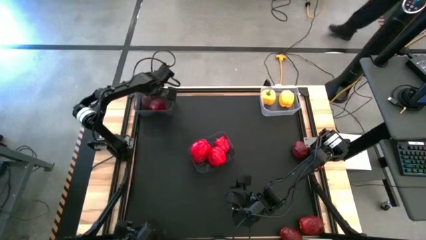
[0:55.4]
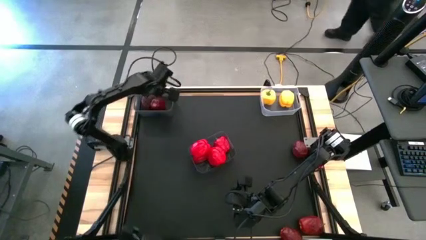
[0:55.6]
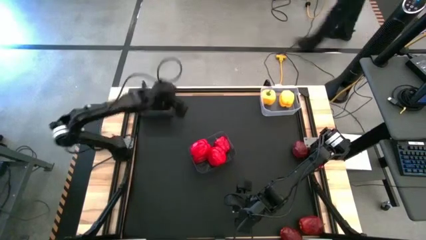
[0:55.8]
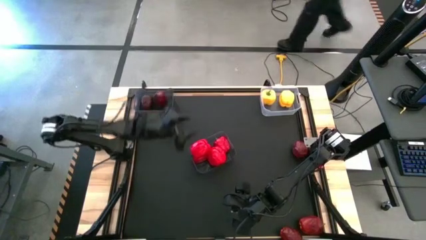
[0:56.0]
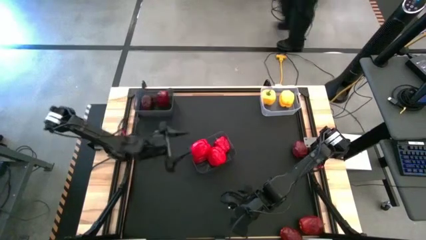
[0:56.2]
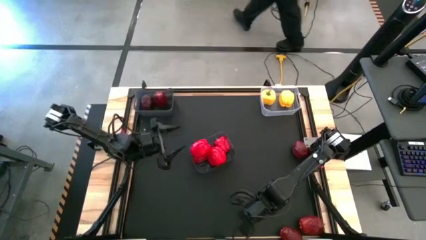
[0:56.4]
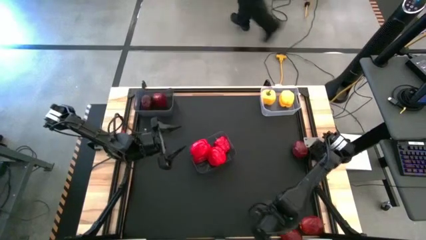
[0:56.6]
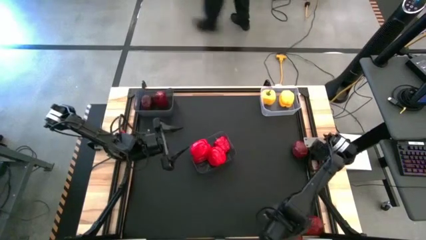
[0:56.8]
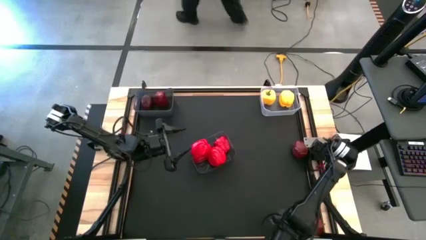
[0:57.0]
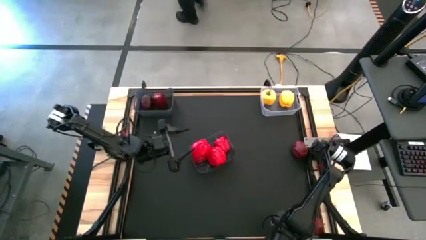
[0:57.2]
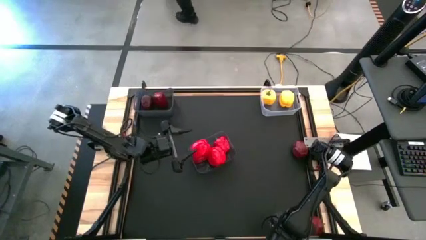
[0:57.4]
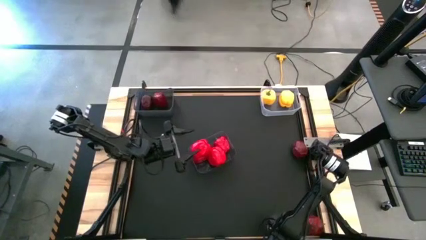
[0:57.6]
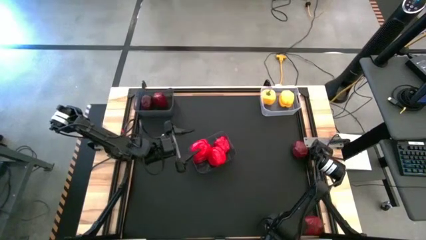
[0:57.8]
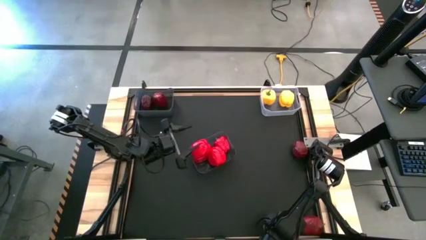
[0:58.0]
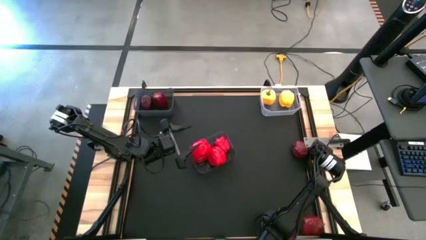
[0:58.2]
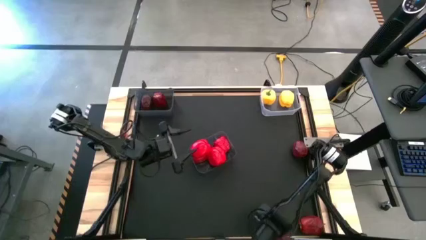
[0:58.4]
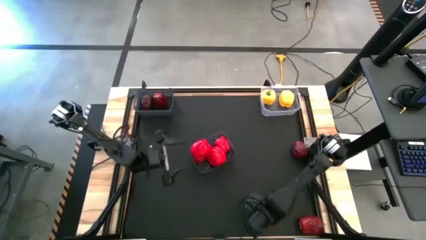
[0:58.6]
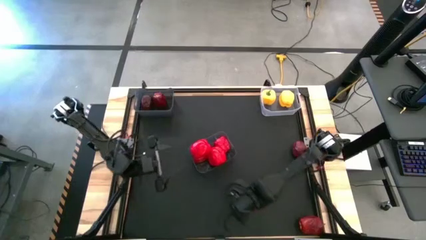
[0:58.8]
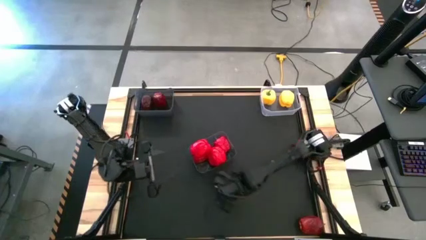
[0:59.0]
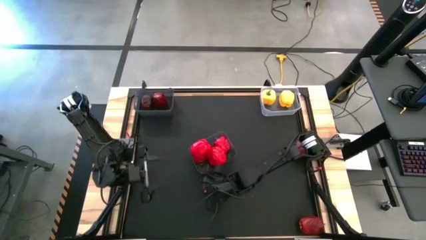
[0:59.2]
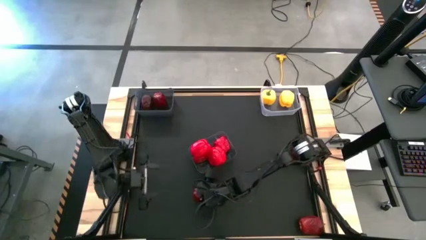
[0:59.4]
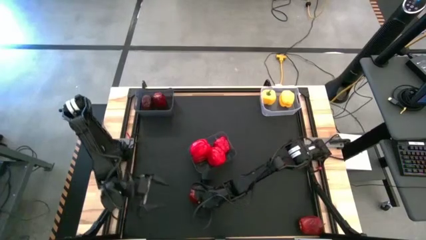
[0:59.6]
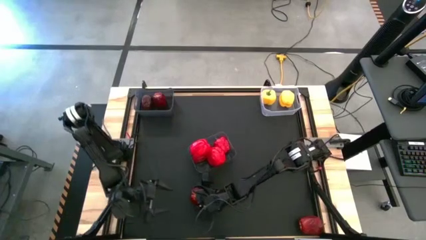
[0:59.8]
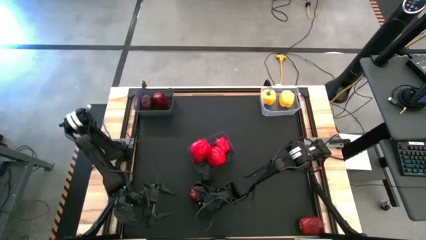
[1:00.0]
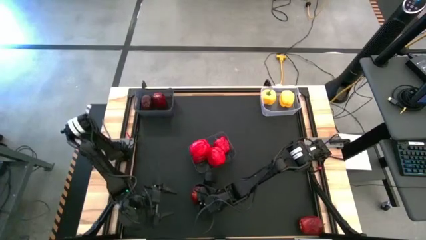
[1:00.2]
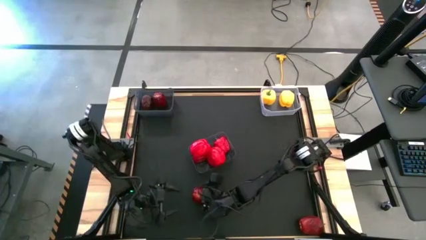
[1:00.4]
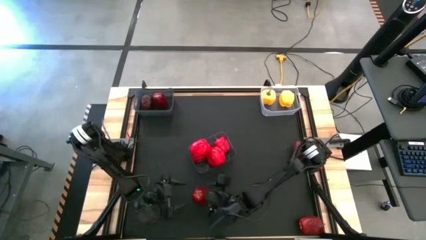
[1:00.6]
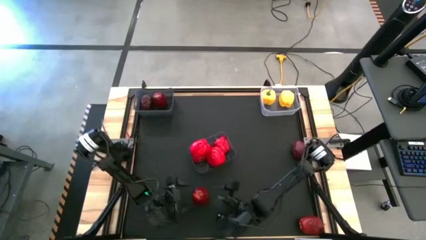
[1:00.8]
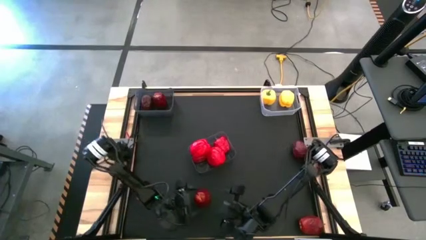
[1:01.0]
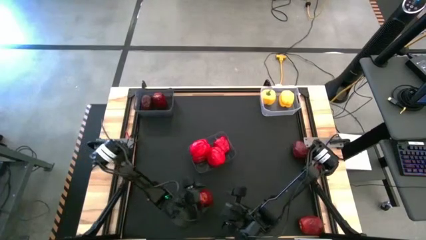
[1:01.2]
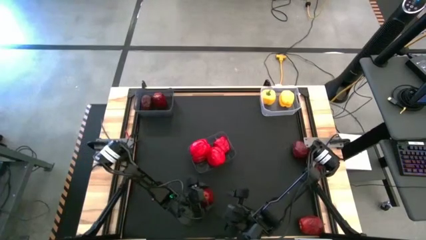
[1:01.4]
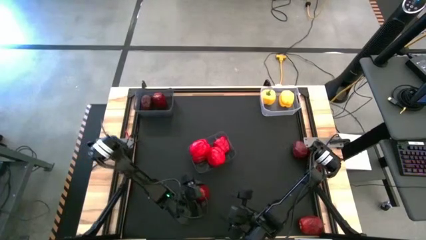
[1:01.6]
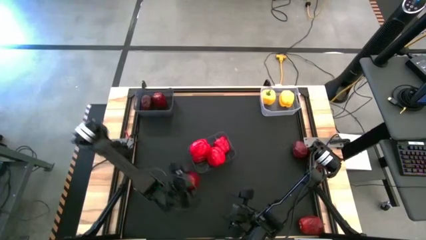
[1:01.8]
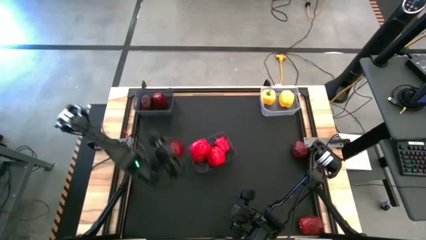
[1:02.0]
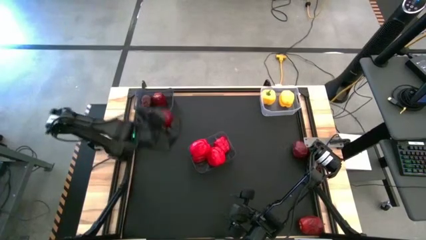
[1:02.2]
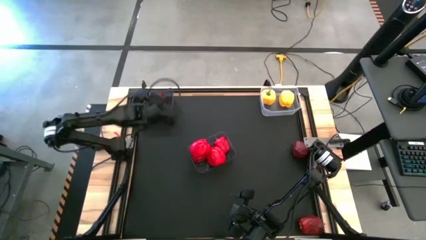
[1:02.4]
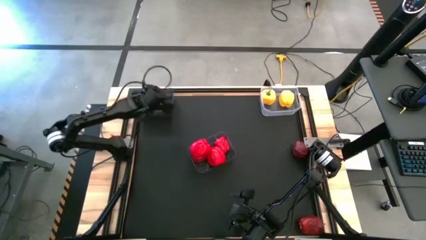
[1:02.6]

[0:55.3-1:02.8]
Task: Sort produce into baskets
Put the red apple into the top black bin

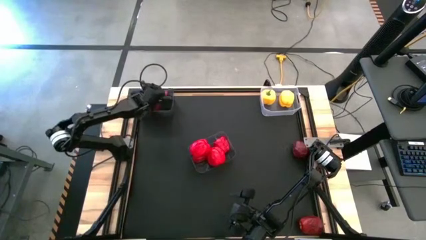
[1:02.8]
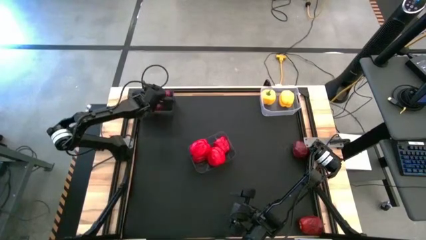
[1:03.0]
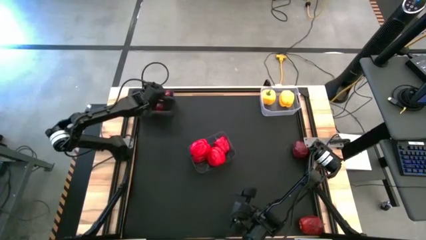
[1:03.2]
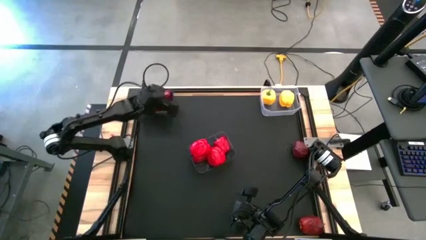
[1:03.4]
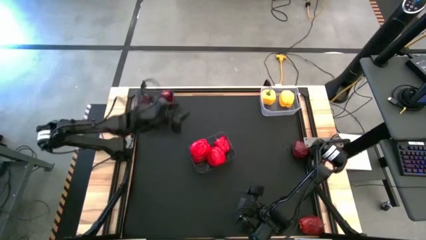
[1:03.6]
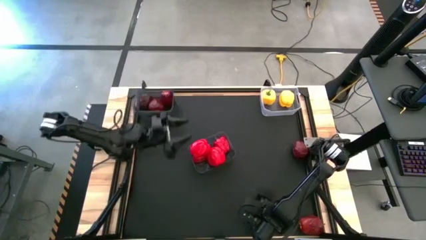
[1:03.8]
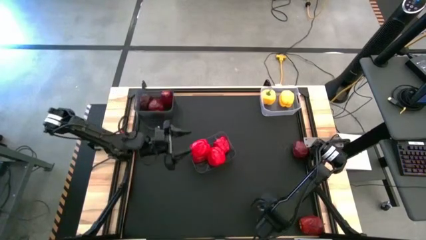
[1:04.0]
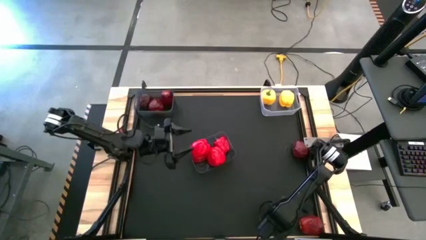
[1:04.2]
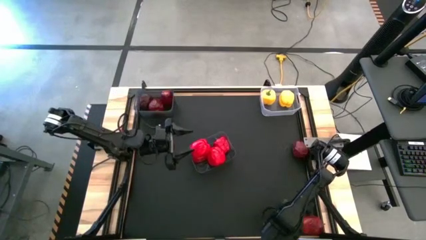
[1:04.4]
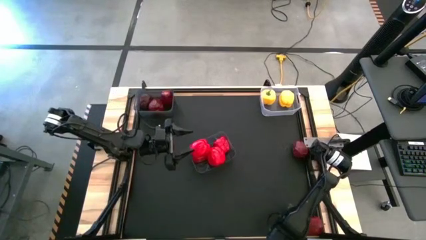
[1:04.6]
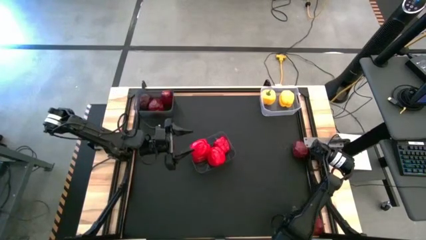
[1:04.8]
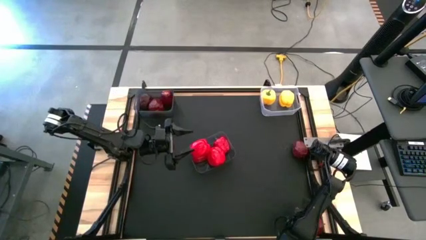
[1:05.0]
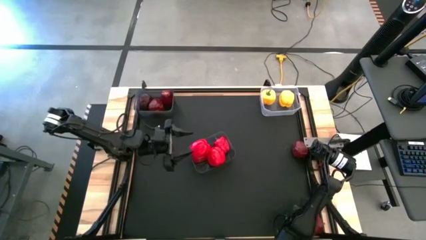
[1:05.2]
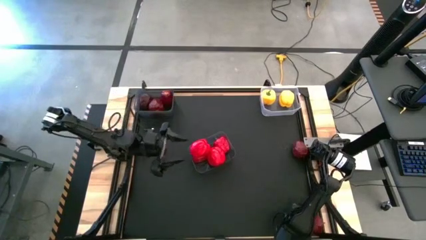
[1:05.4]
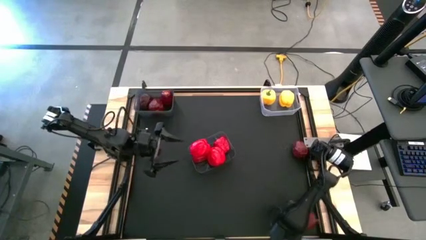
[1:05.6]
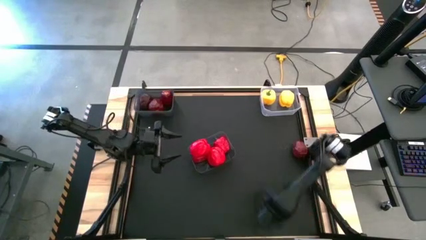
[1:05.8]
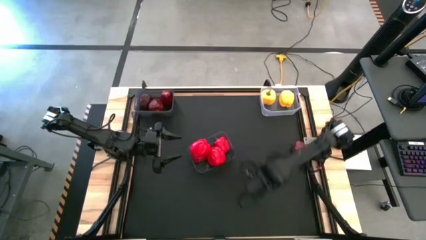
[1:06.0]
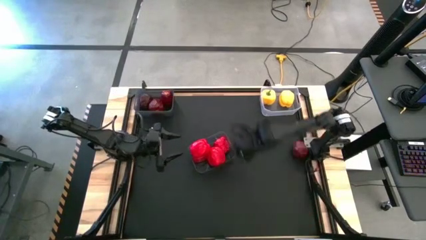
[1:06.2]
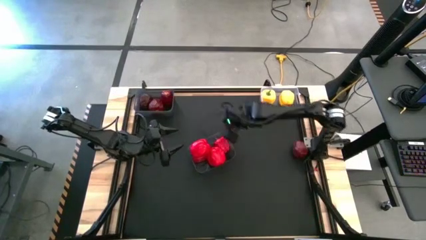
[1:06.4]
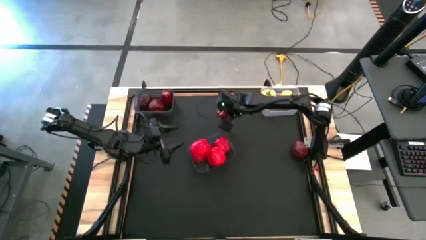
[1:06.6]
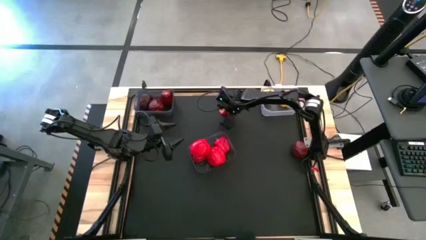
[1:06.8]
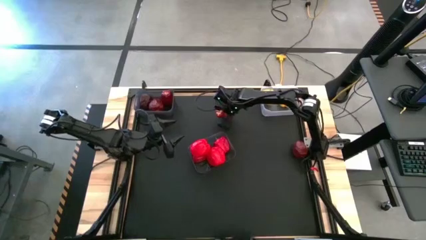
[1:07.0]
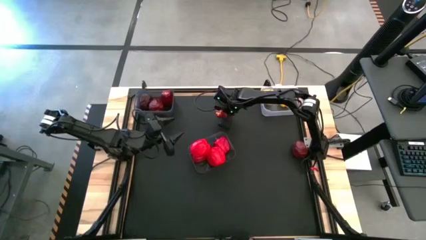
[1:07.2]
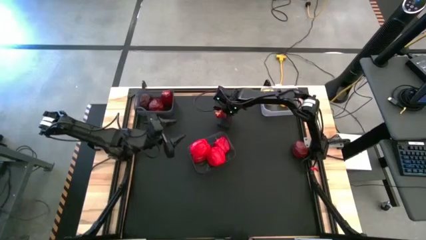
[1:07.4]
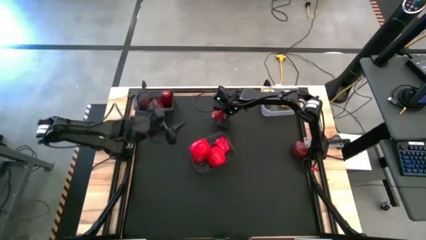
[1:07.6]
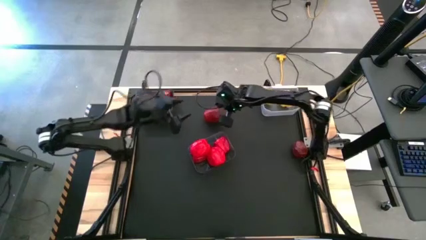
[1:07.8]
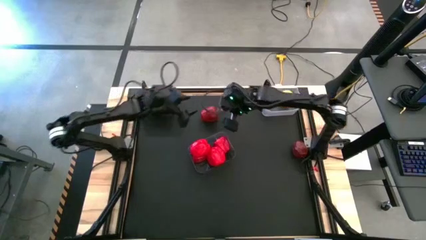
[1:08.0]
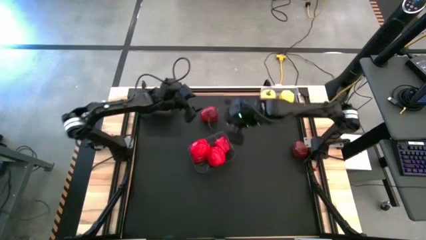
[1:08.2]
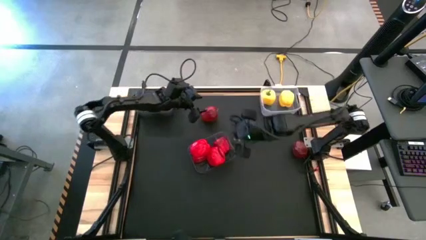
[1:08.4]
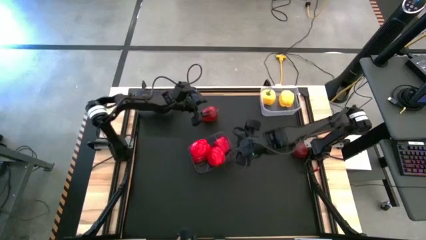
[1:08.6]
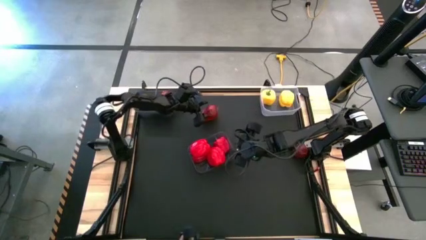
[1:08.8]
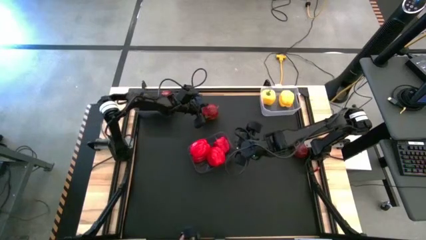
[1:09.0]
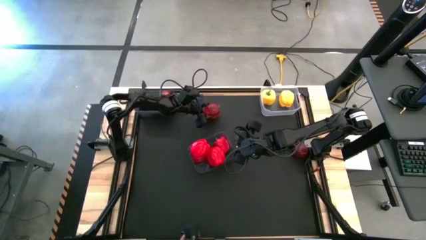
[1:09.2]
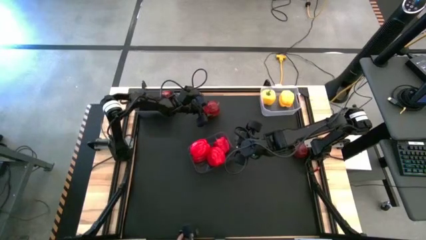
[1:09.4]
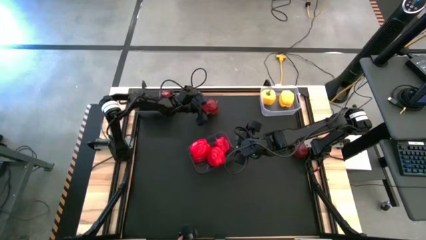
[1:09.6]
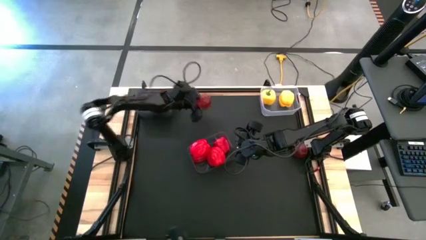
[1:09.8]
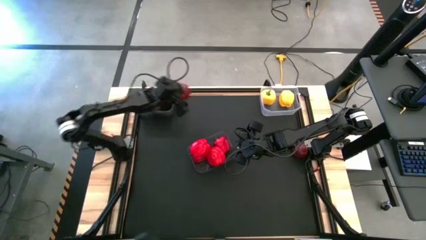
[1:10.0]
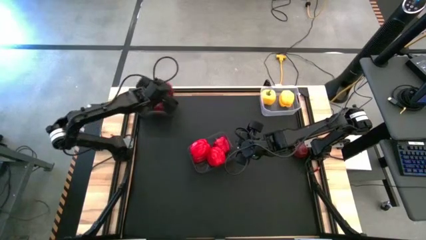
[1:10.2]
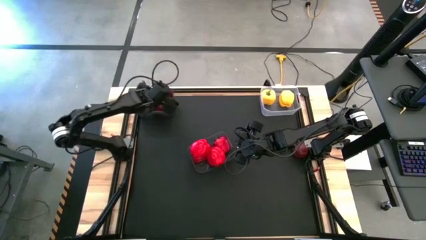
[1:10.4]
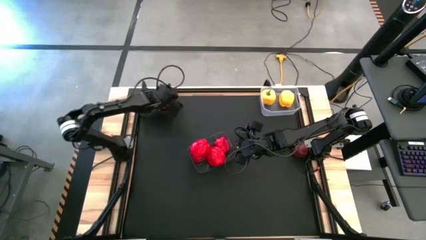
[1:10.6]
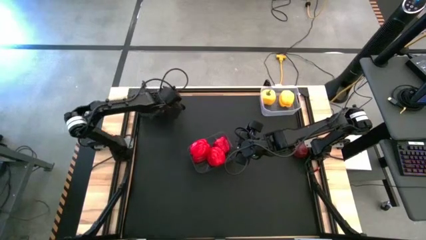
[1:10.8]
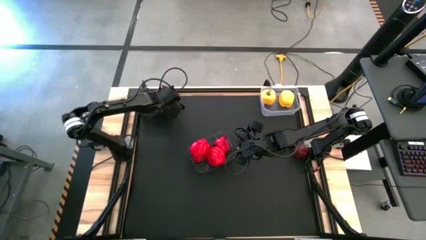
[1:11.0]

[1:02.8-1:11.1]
Put the red apple into the top black bin

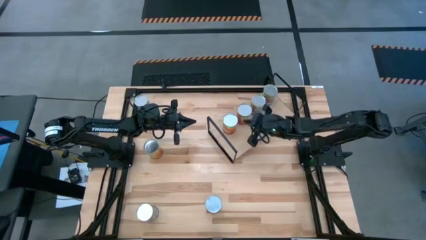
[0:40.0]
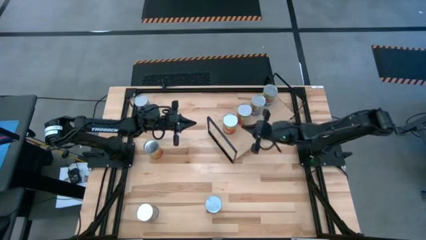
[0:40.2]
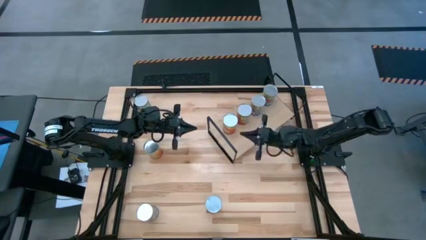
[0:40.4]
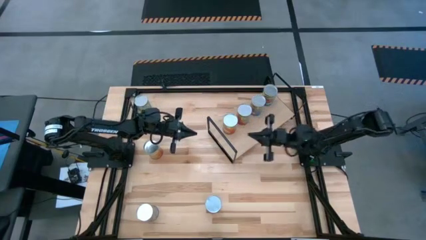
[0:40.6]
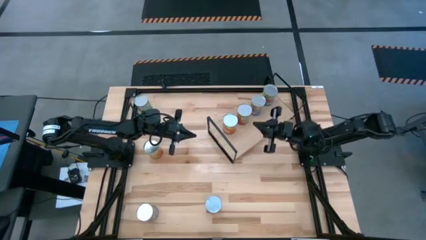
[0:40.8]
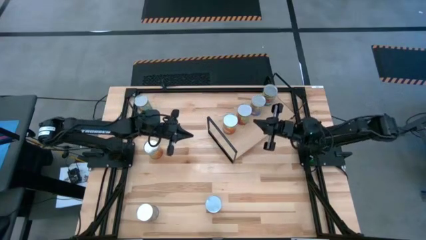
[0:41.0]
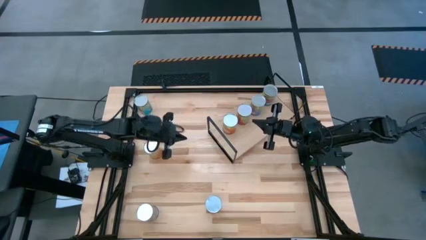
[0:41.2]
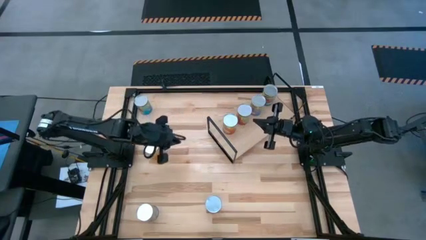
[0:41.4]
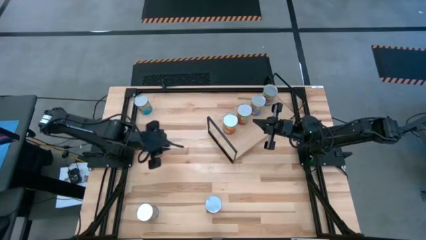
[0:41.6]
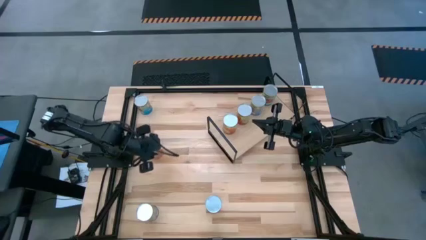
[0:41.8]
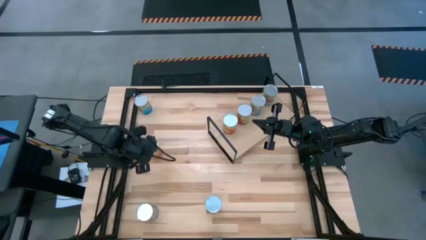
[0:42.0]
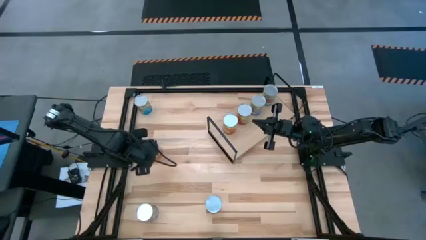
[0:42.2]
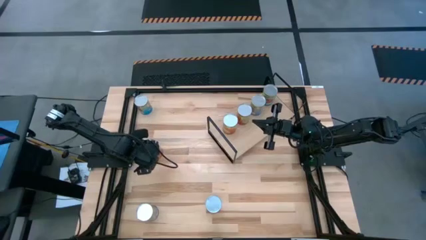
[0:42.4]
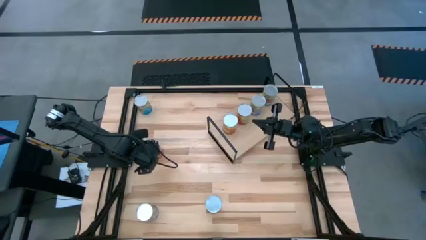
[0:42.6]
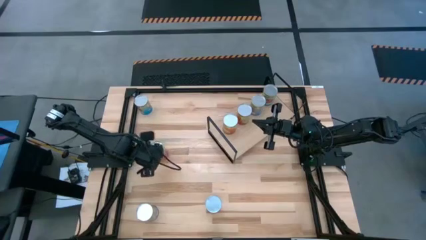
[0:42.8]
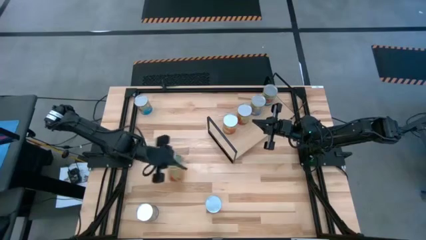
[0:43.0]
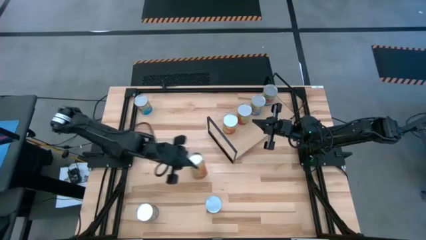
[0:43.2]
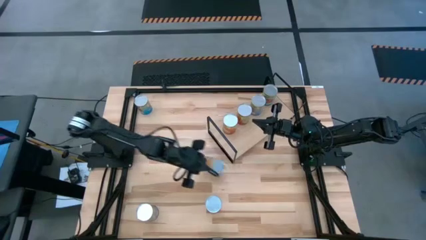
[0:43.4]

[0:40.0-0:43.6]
Task: Pick and place cans onto a shelf
Put the canned green beans on the shelf aligned with the other canned green beans
